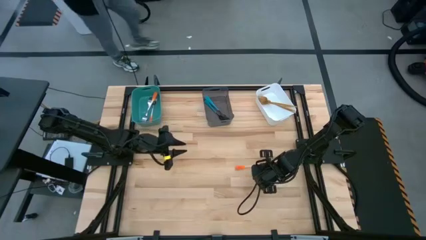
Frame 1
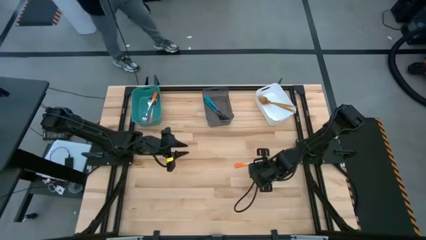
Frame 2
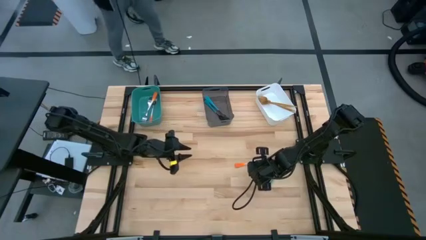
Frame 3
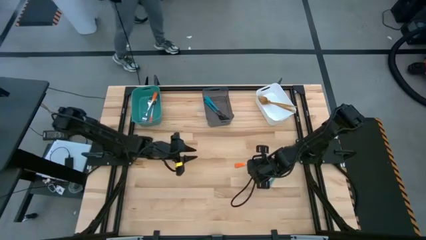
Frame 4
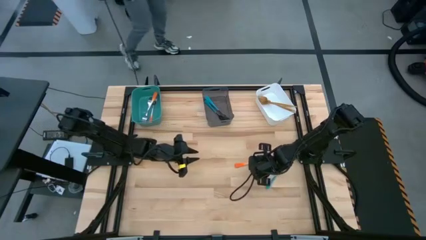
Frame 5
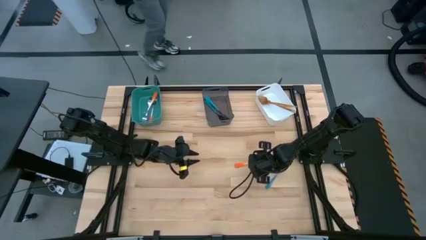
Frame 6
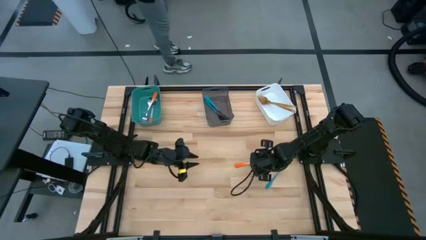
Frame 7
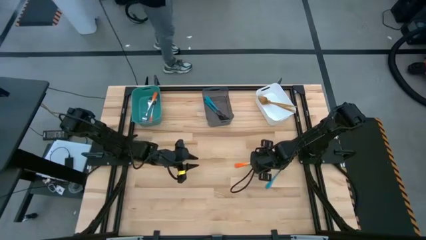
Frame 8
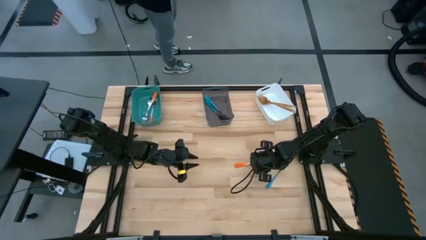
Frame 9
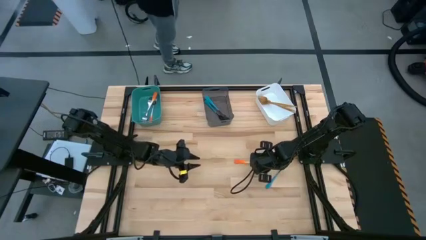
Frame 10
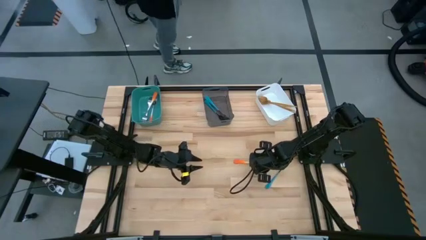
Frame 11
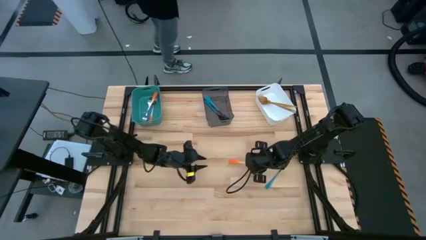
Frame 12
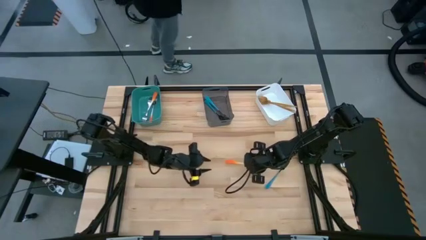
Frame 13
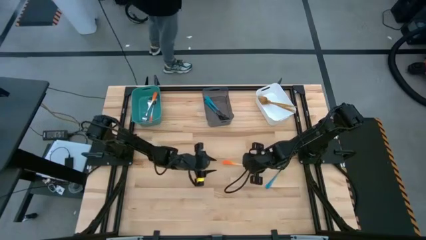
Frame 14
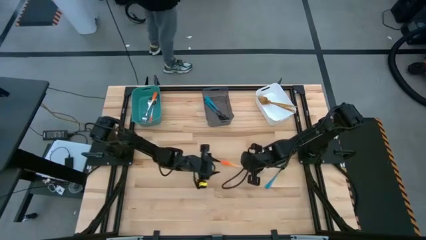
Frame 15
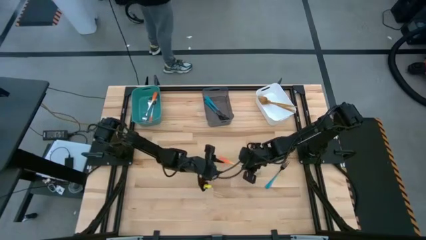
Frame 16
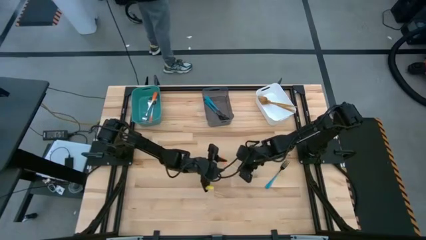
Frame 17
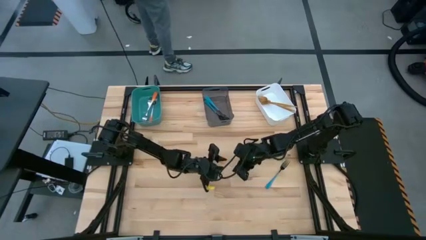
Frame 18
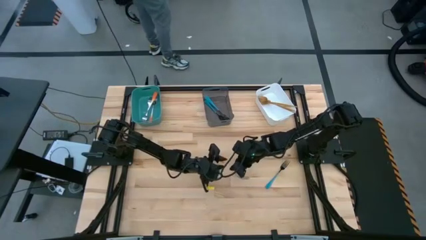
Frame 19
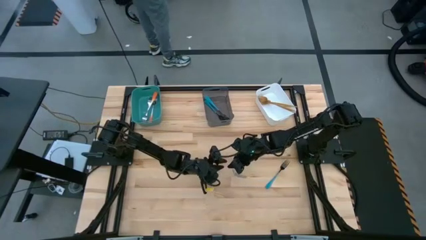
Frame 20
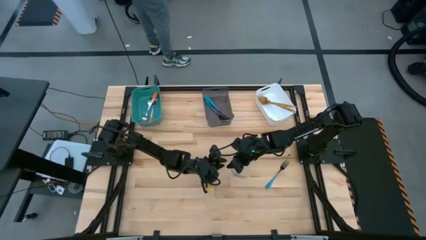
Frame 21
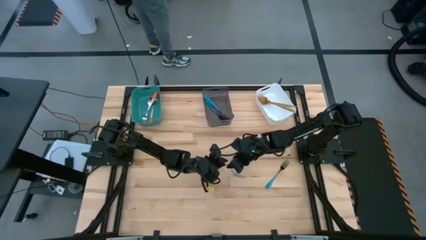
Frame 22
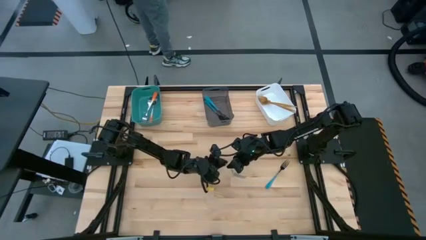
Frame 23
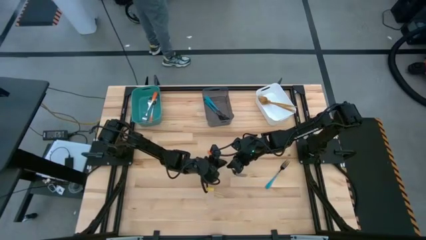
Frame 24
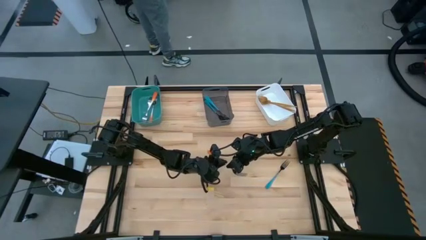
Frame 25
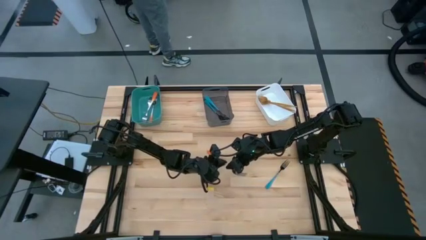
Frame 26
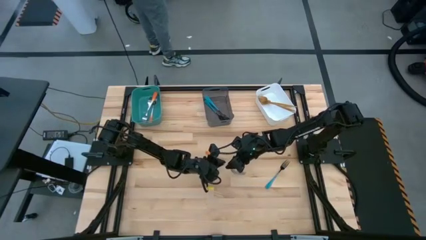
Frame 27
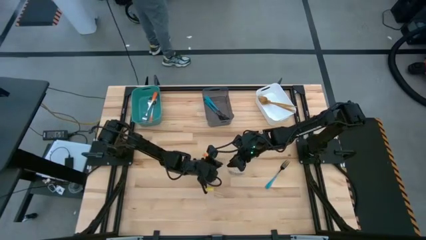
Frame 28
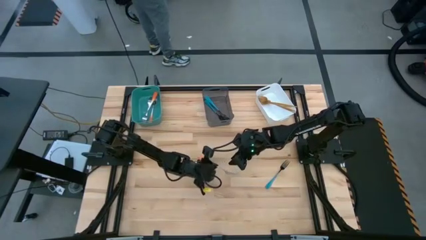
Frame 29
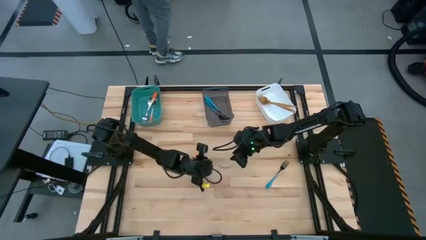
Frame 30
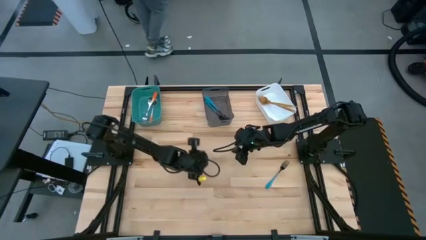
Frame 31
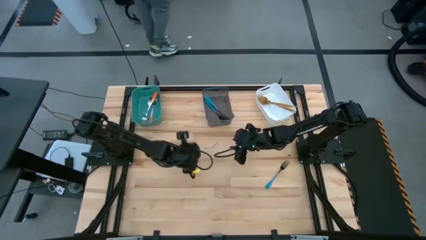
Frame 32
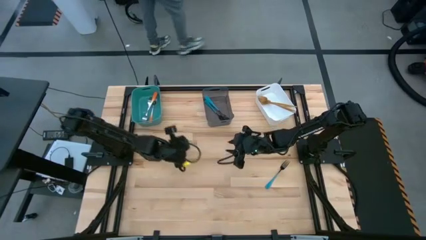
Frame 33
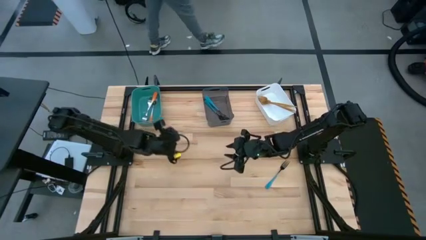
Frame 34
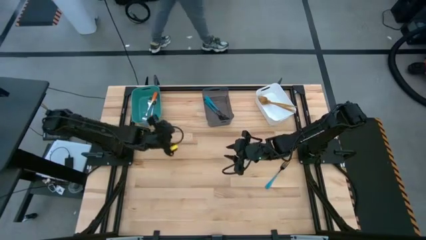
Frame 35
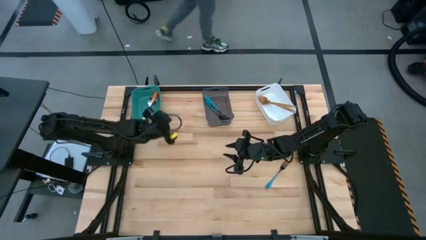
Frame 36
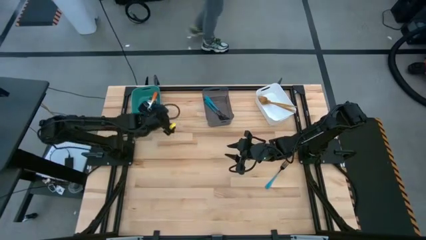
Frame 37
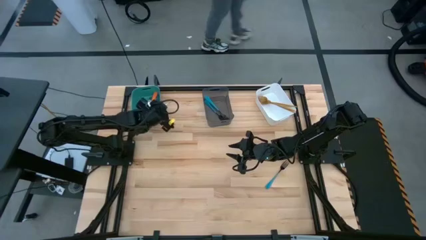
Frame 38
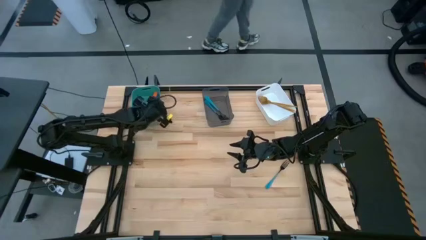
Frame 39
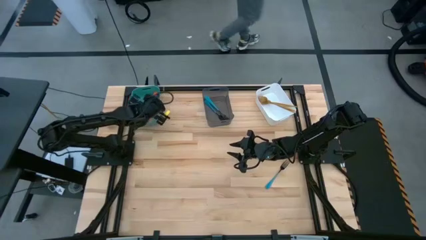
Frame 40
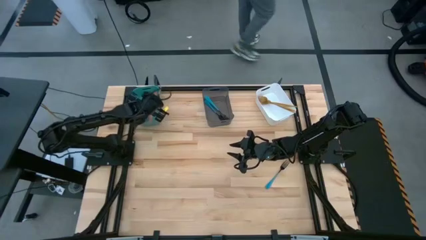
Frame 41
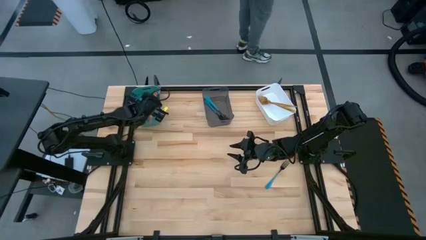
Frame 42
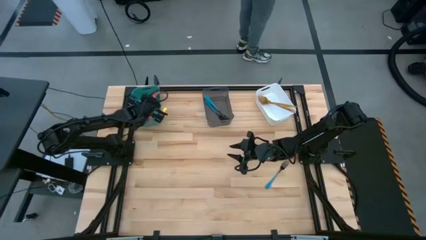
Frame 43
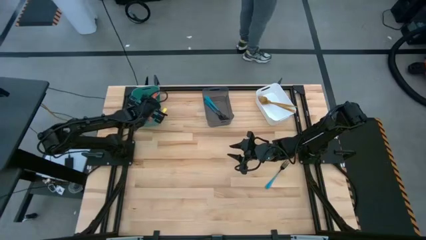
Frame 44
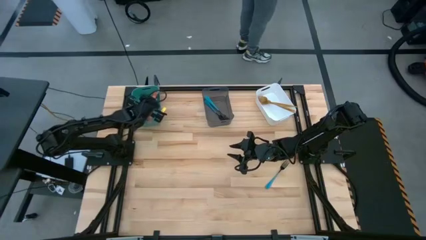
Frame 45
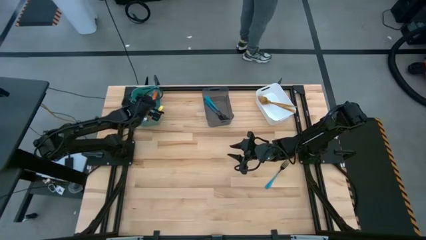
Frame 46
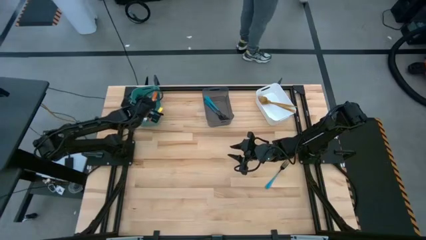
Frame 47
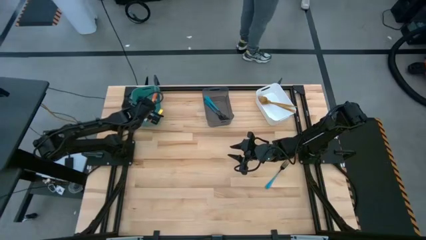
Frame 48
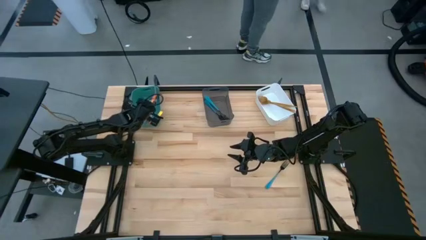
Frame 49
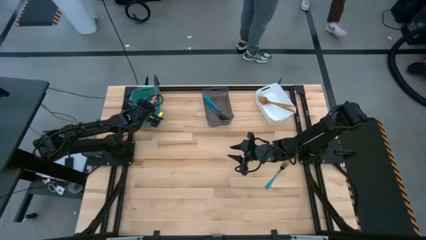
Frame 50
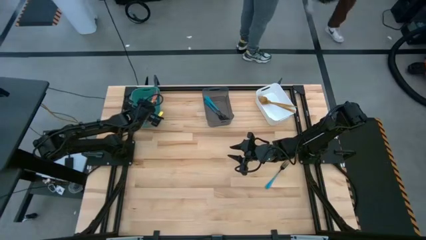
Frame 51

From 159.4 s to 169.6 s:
Task: Sort silverware by color (type)
Put the orange fork into the green bin
